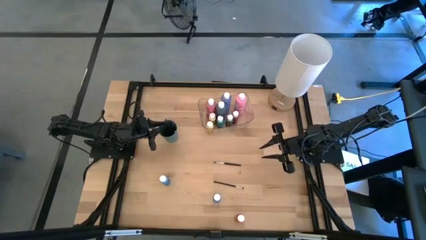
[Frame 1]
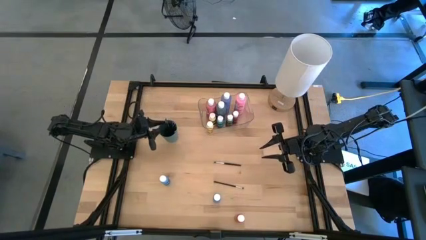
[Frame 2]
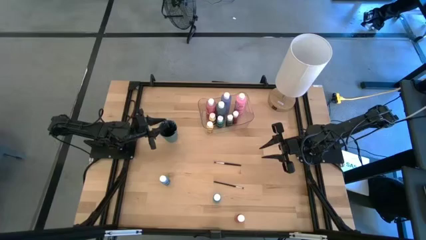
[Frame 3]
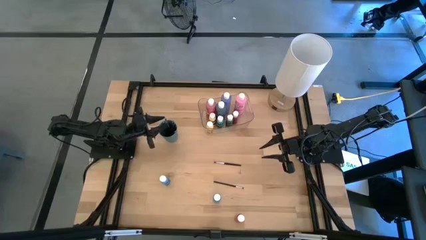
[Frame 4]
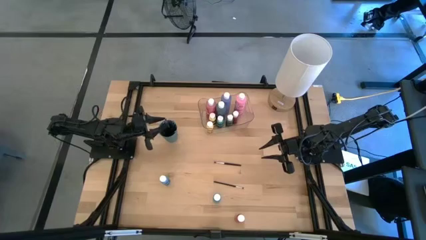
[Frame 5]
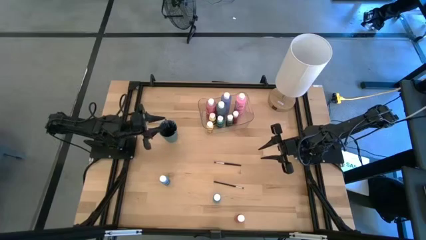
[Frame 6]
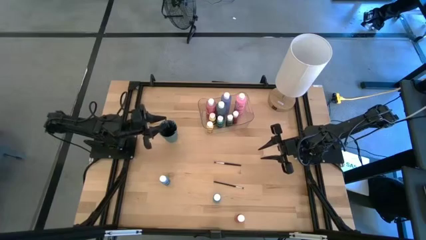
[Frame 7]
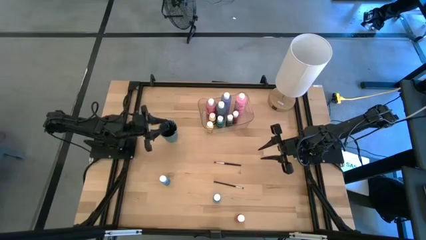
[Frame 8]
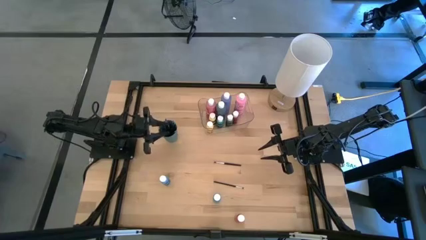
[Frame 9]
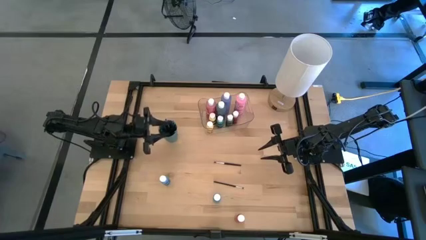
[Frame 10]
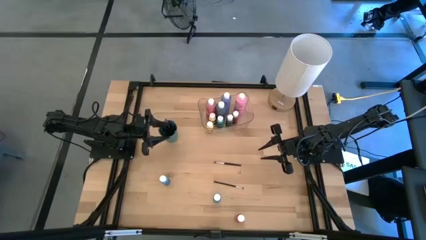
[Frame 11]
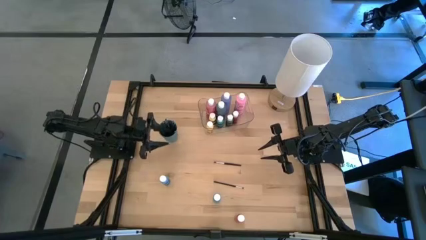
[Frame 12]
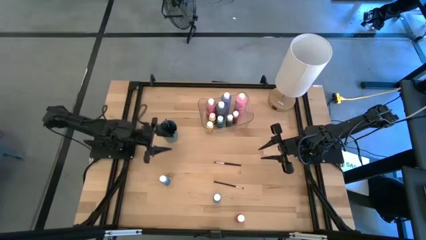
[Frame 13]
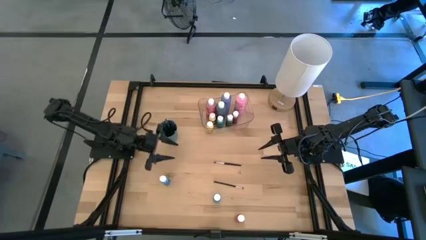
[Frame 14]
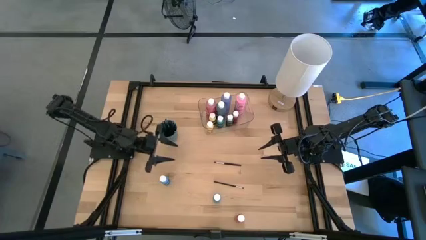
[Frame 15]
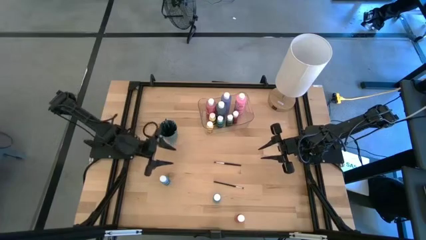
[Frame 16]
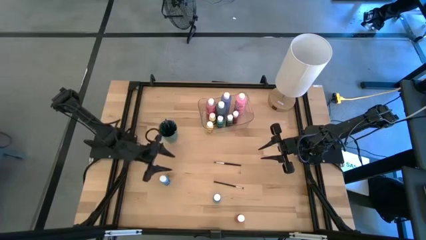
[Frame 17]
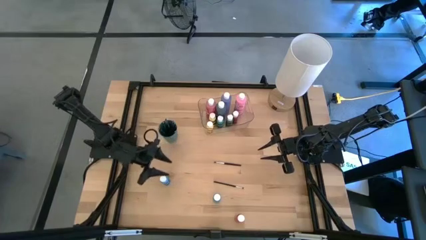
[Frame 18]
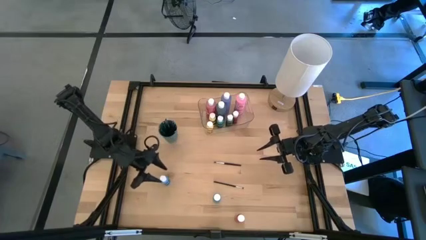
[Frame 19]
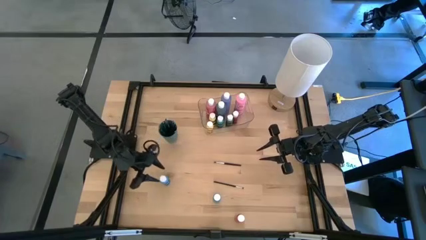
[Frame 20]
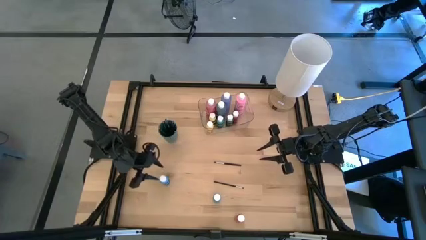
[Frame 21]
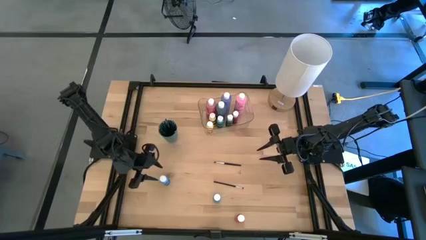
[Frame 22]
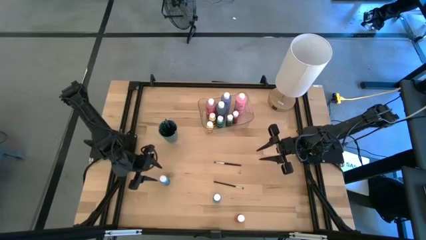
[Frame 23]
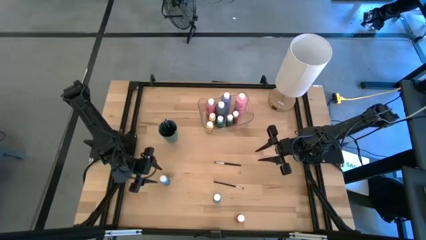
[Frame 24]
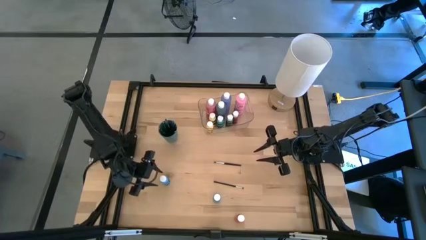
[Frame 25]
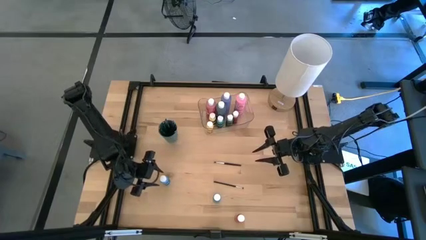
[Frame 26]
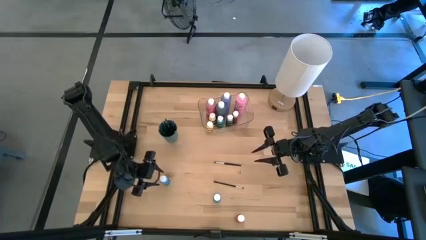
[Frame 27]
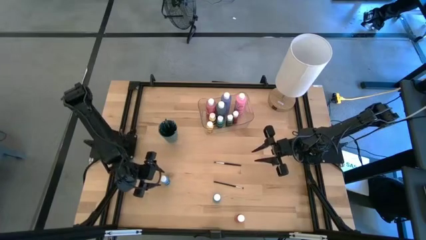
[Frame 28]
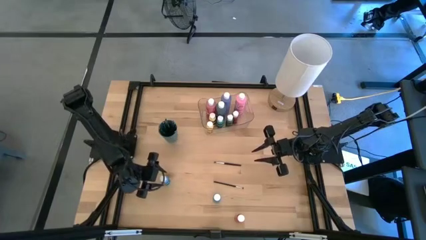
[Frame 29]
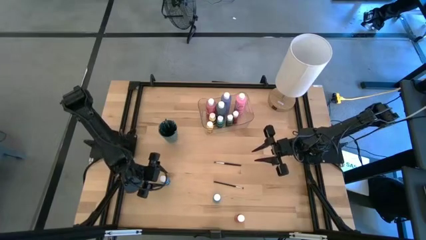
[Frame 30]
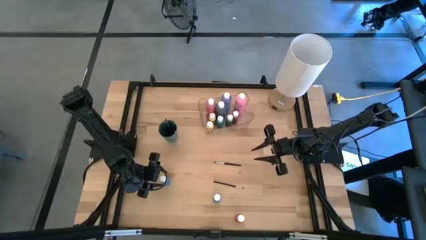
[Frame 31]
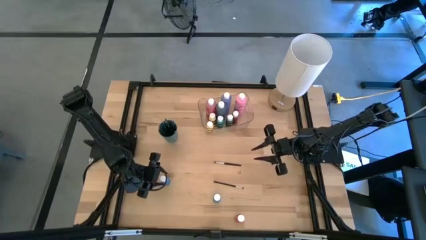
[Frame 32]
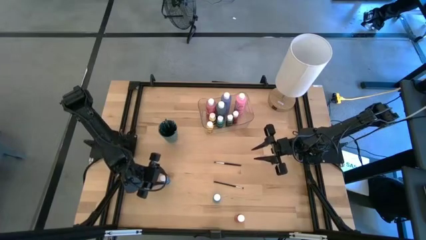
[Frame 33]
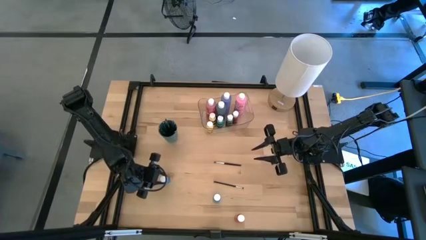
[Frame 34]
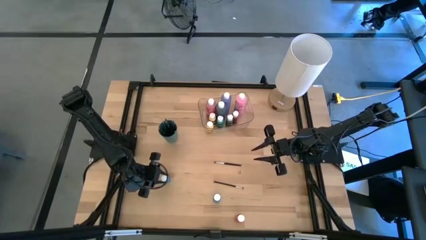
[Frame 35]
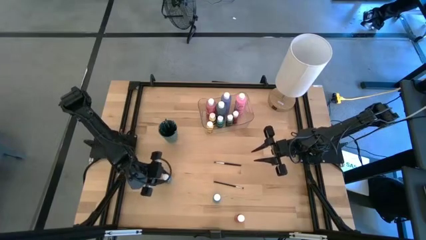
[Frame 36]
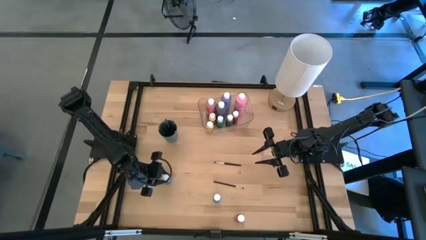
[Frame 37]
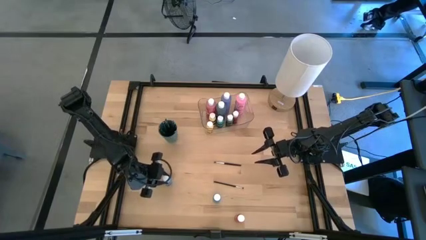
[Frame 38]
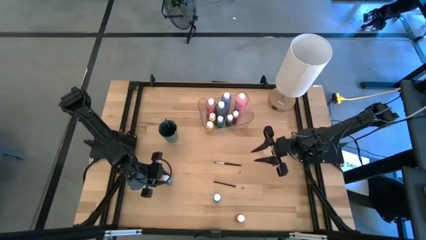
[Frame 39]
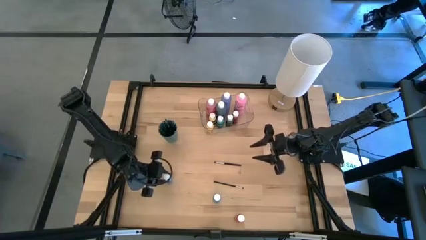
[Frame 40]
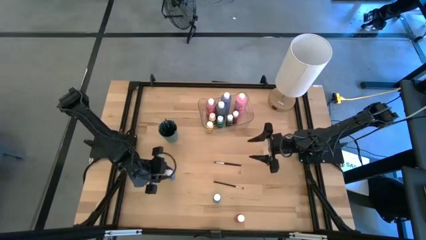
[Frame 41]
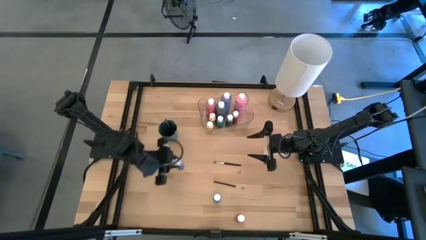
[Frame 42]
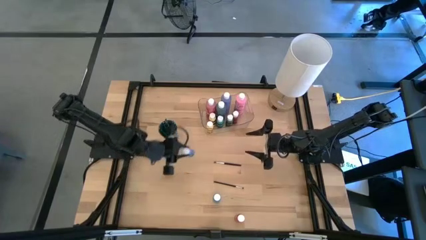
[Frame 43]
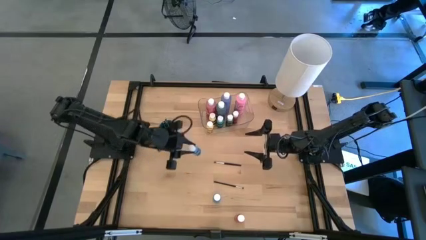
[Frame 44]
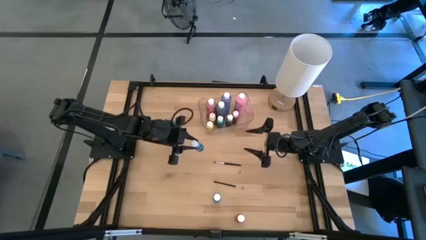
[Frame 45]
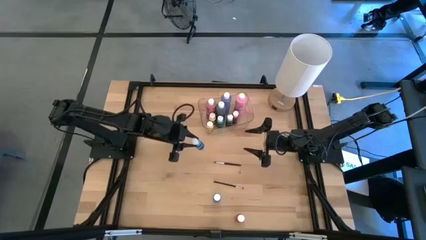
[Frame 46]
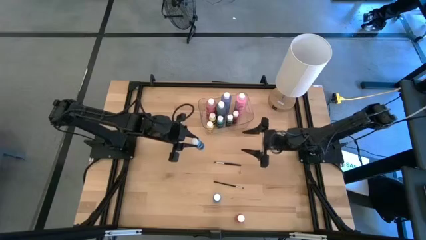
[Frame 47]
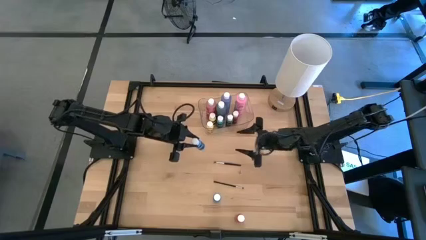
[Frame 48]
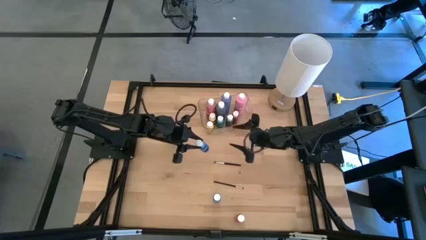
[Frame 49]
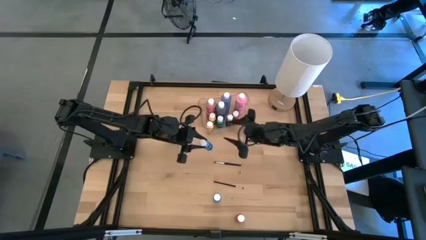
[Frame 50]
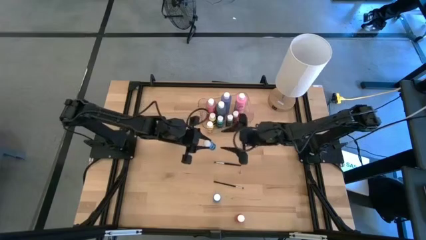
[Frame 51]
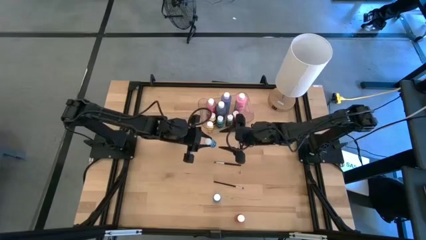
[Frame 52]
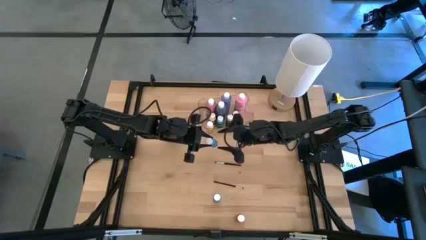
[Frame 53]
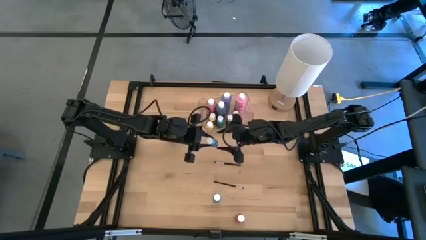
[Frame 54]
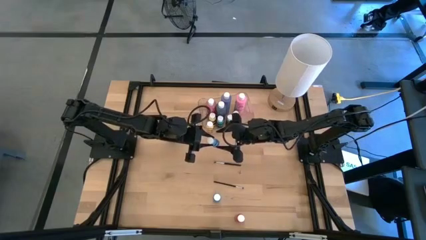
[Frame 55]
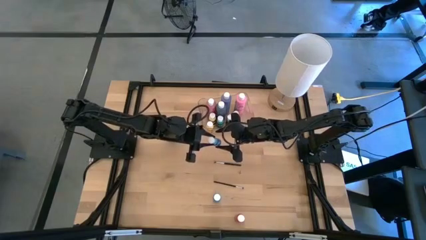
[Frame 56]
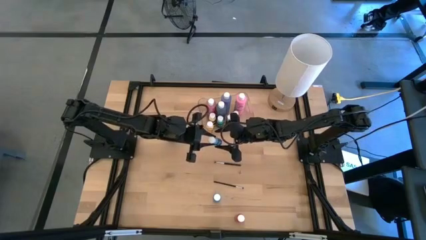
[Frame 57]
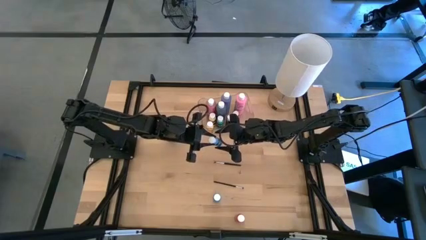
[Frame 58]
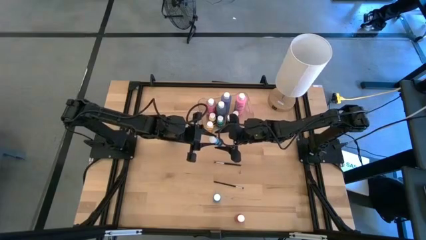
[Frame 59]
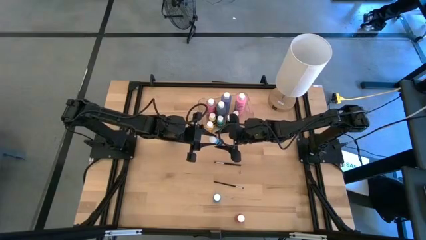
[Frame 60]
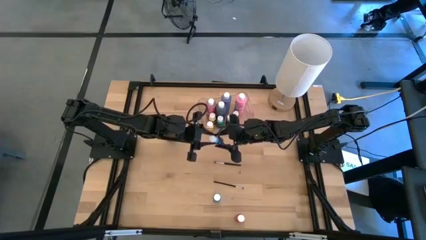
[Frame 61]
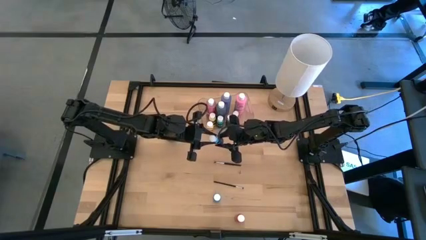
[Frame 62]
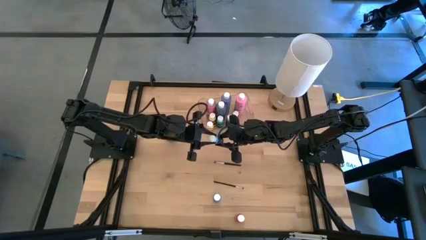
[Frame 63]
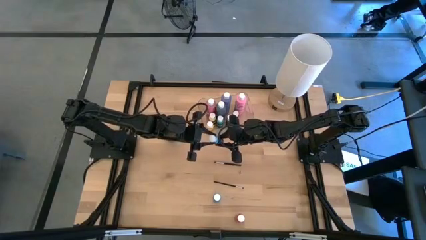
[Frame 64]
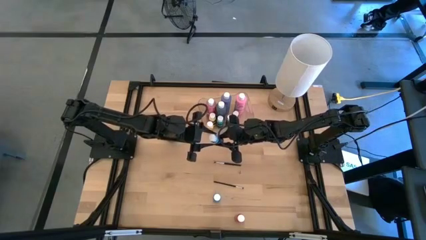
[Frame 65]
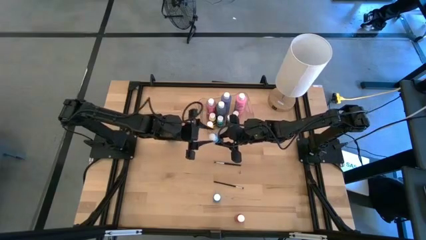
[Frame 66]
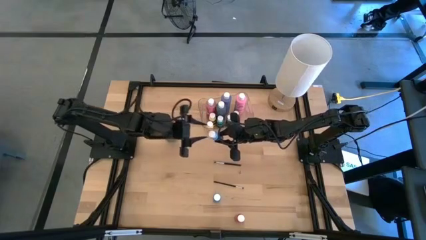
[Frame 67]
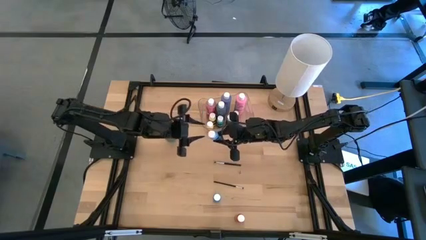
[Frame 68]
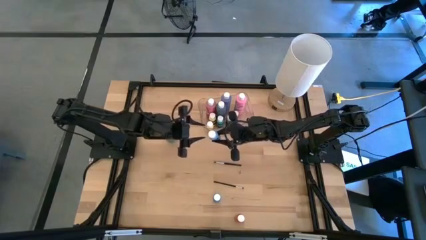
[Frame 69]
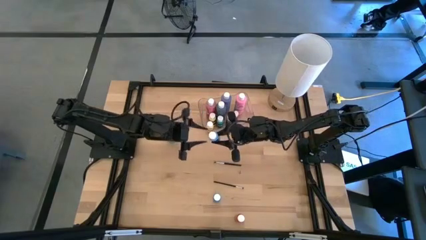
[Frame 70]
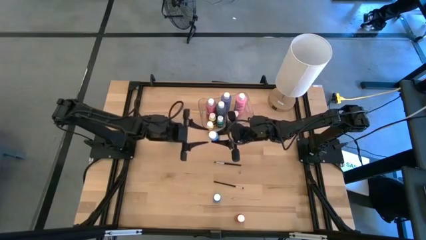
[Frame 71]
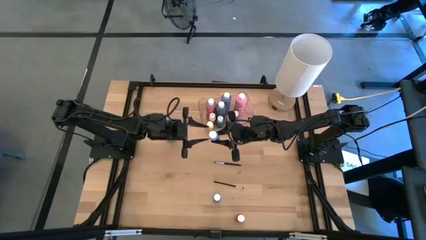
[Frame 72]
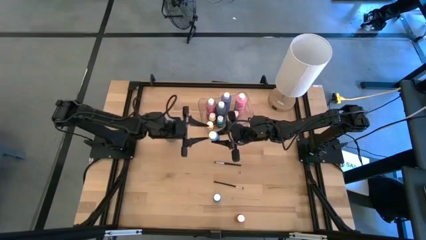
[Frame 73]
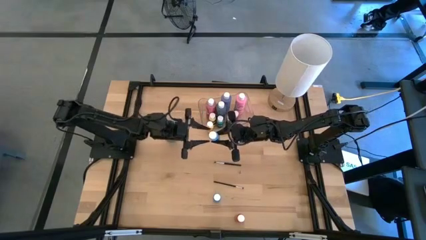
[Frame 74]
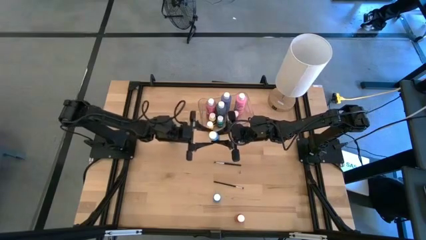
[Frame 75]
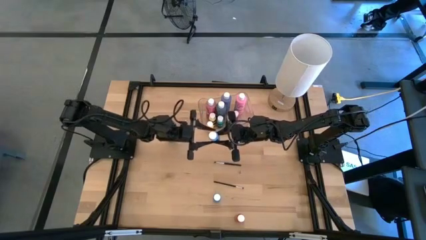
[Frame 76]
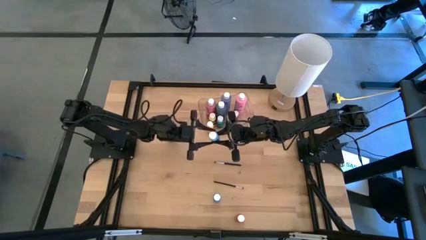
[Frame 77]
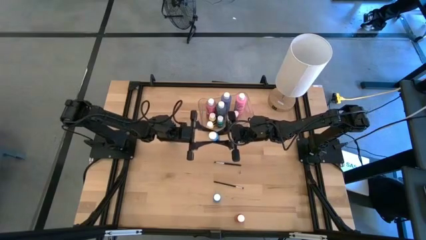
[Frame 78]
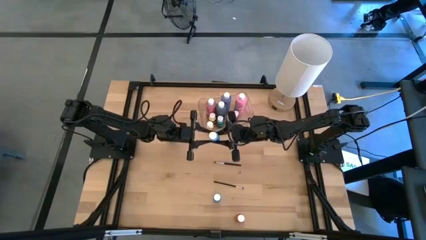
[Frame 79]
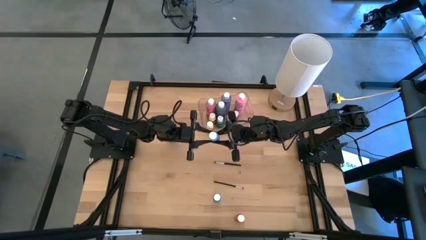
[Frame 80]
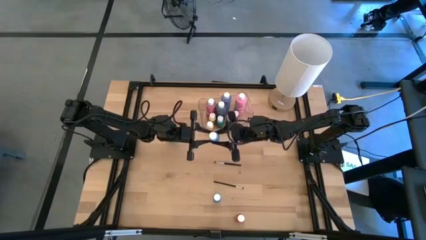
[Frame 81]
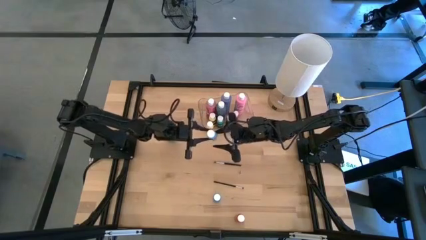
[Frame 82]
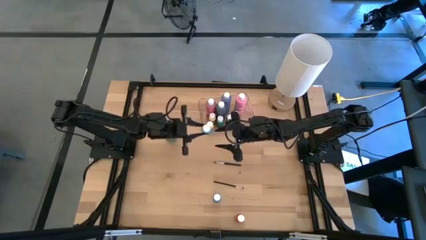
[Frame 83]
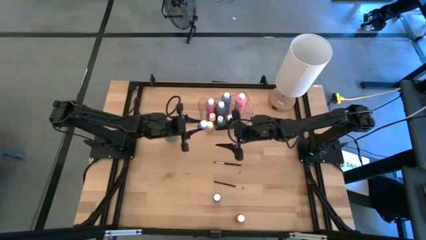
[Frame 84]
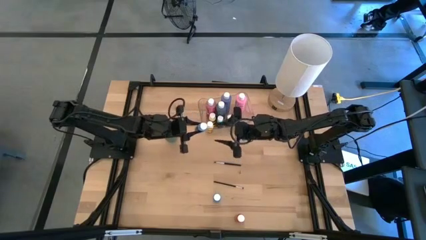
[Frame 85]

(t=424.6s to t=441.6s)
Task: Pick & Place Paint Supplies
Put the blue paint bottle into the transparent bin

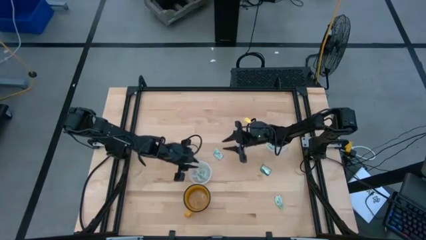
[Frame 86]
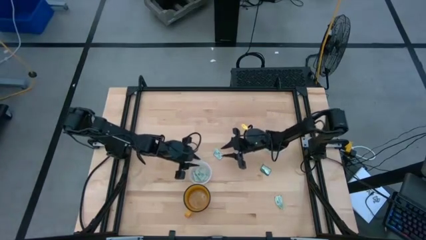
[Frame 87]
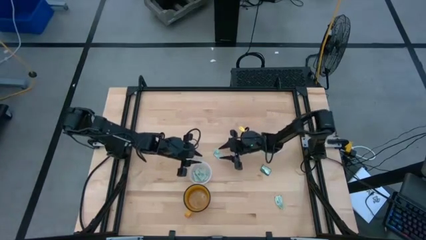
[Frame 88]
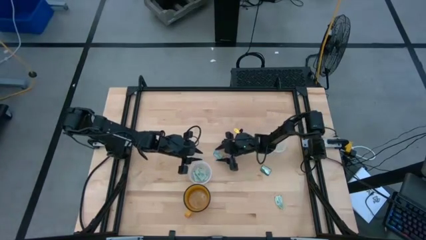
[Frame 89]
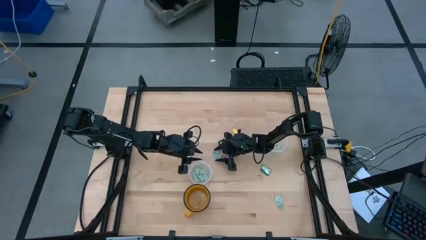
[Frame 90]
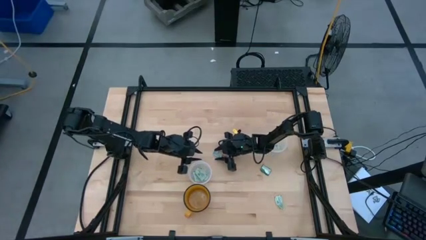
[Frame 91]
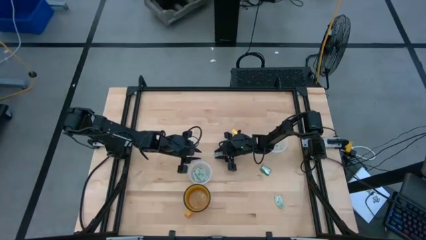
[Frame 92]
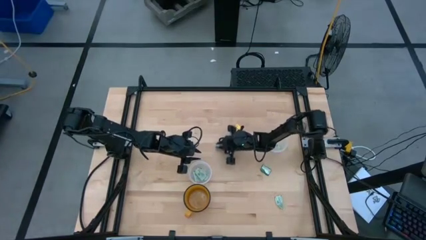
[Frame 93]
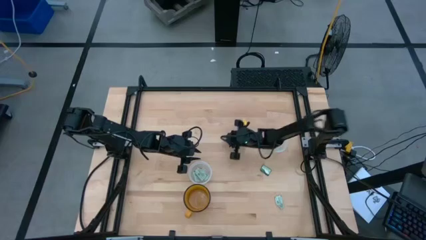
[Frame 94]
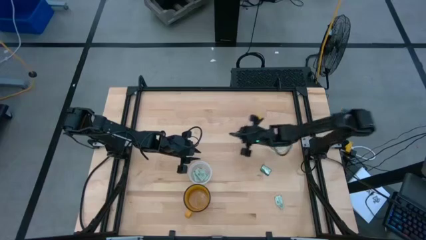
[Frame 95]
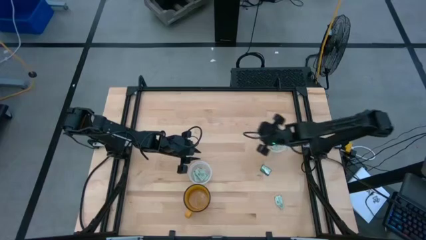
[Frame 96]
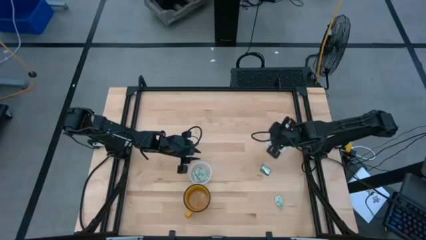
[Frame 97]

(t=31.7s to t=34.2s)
Task: Pick and place items into bin
Put the stevia packet into the right transparent bin
